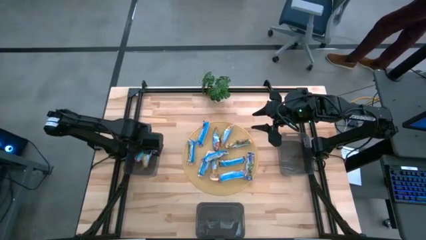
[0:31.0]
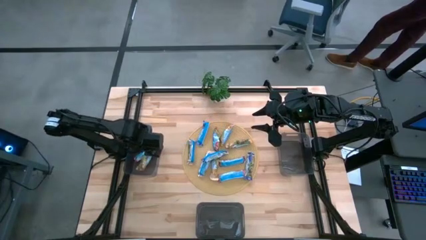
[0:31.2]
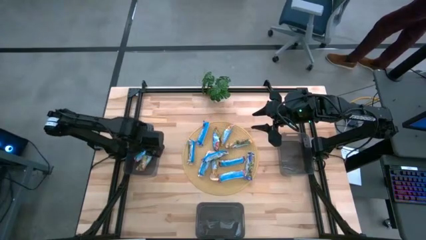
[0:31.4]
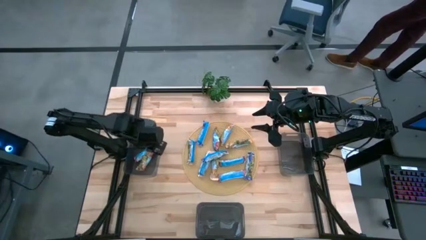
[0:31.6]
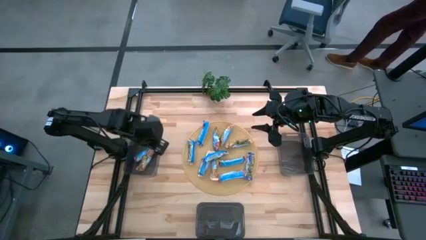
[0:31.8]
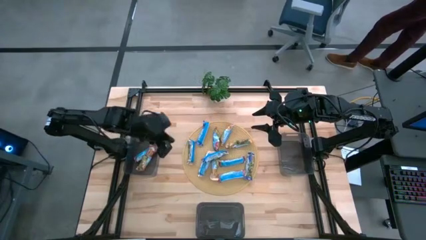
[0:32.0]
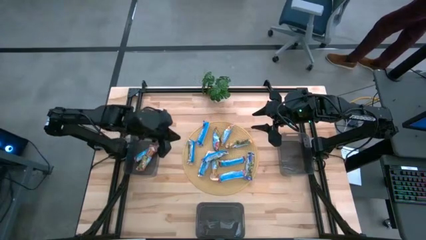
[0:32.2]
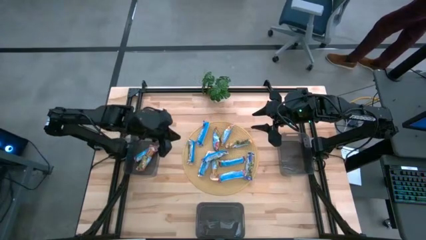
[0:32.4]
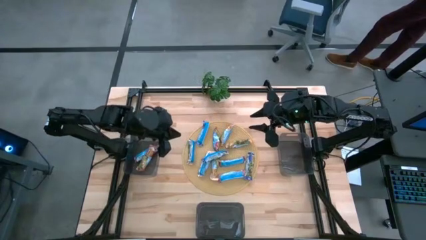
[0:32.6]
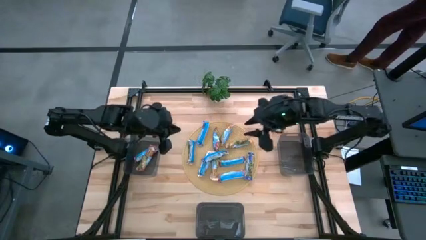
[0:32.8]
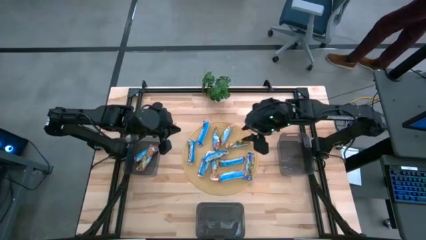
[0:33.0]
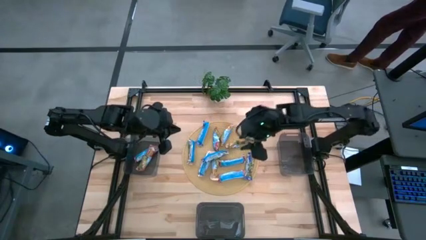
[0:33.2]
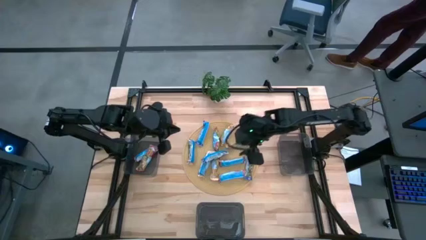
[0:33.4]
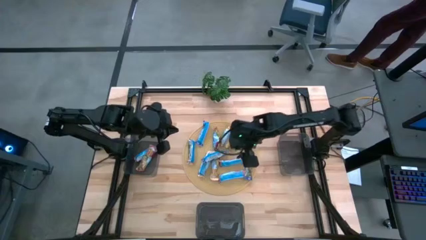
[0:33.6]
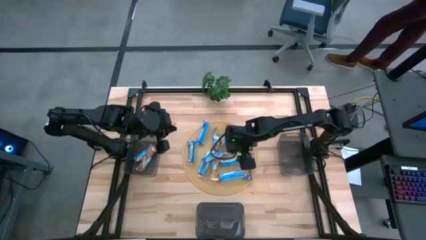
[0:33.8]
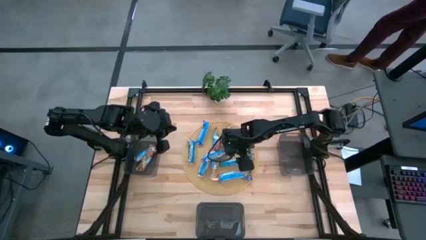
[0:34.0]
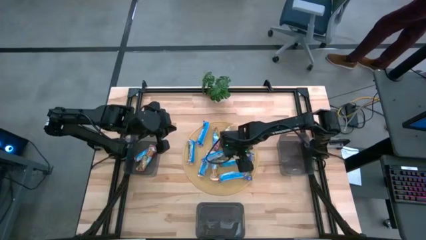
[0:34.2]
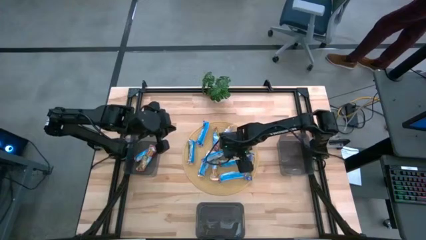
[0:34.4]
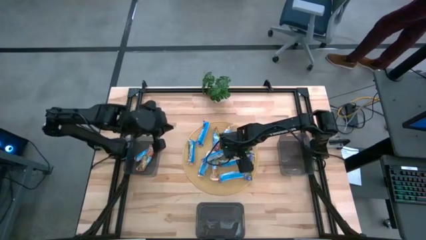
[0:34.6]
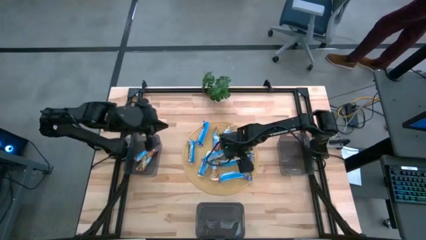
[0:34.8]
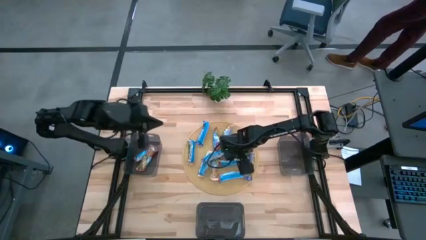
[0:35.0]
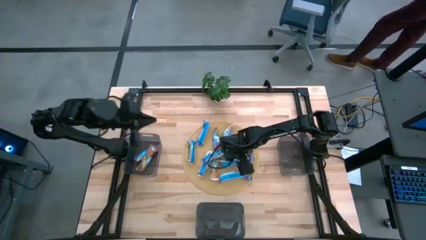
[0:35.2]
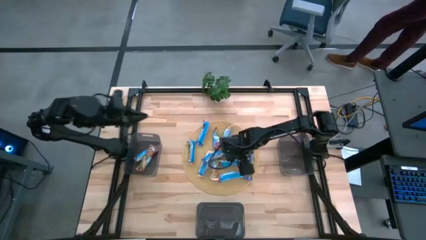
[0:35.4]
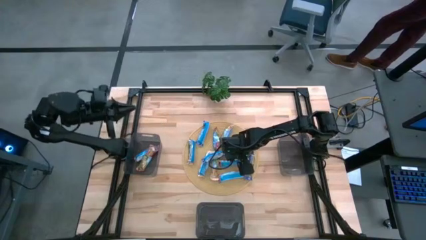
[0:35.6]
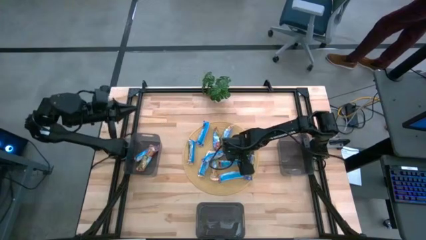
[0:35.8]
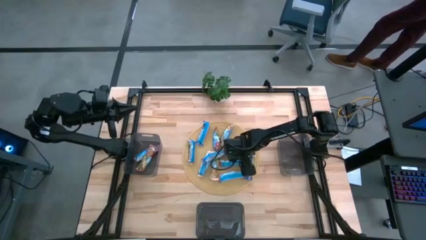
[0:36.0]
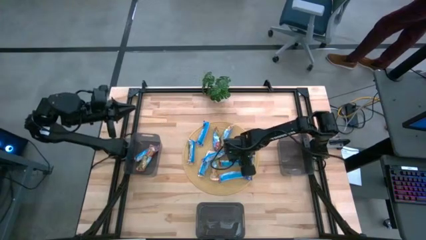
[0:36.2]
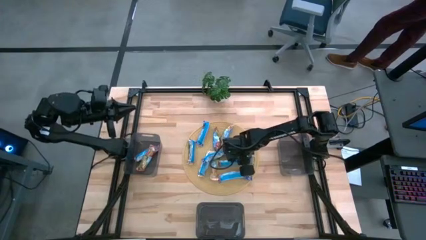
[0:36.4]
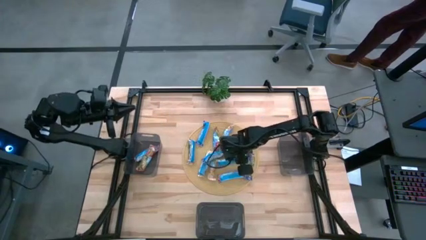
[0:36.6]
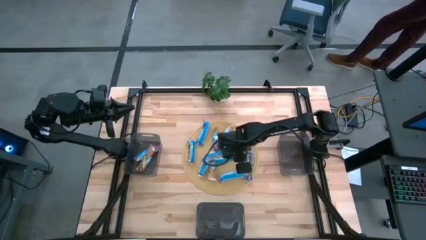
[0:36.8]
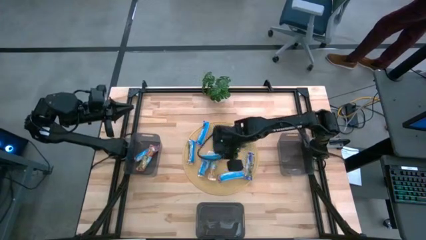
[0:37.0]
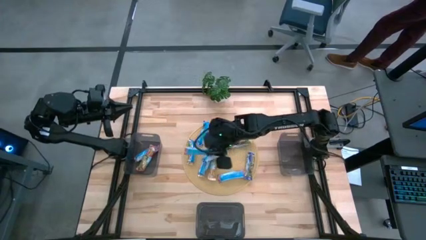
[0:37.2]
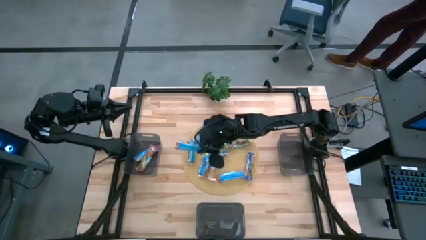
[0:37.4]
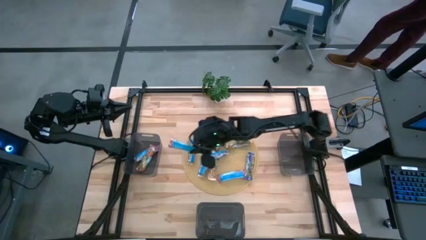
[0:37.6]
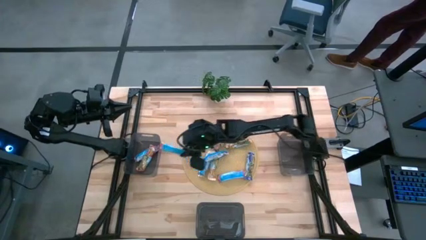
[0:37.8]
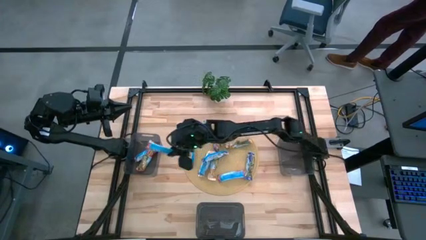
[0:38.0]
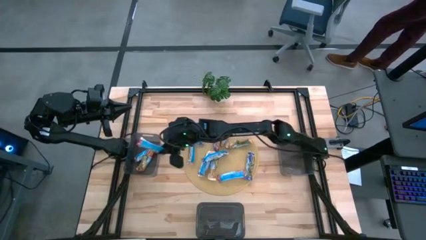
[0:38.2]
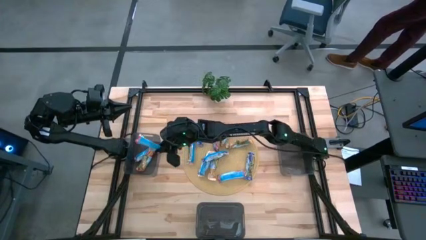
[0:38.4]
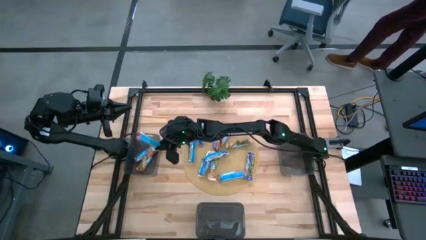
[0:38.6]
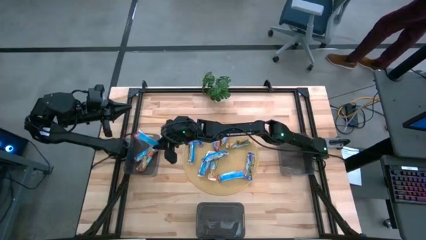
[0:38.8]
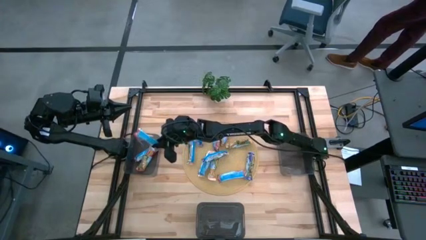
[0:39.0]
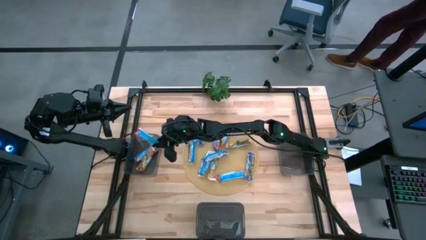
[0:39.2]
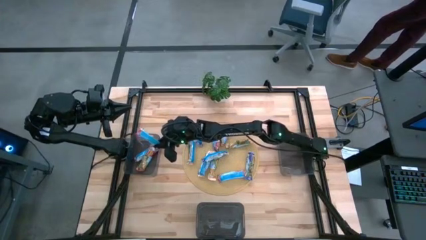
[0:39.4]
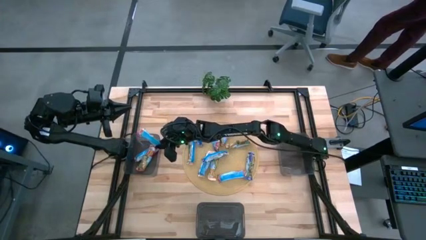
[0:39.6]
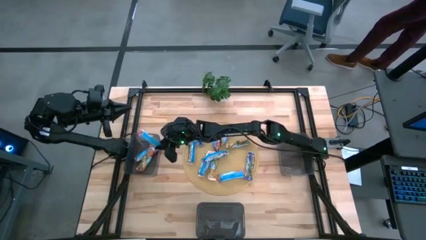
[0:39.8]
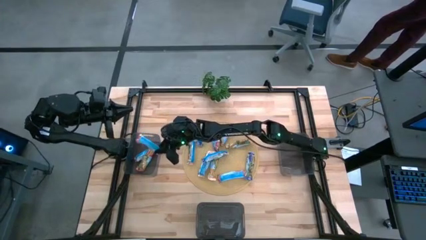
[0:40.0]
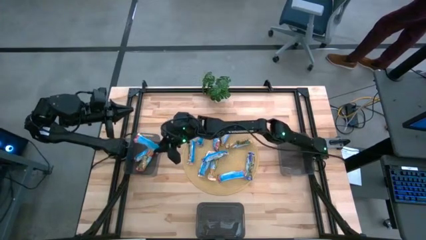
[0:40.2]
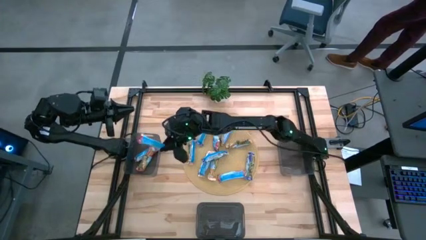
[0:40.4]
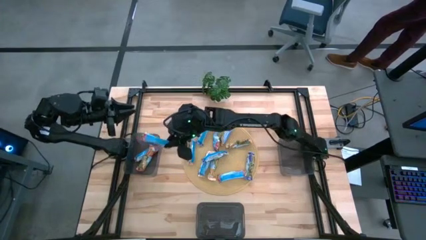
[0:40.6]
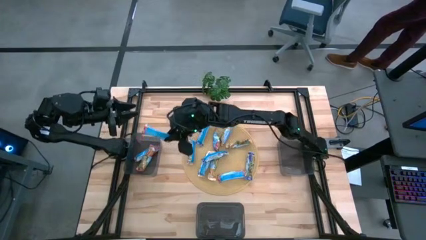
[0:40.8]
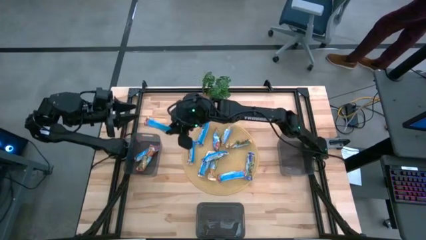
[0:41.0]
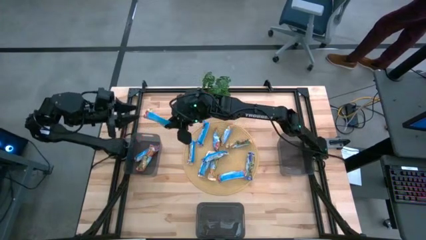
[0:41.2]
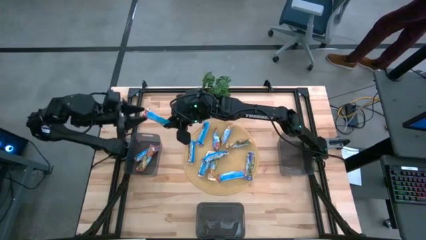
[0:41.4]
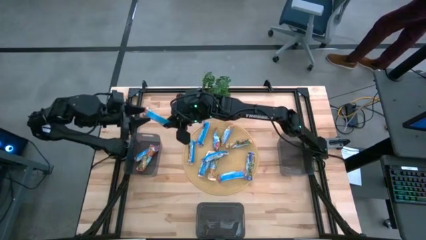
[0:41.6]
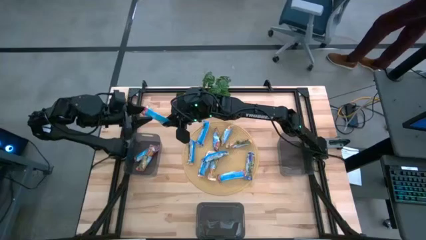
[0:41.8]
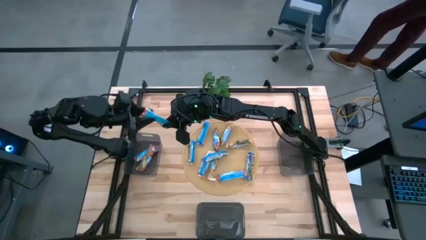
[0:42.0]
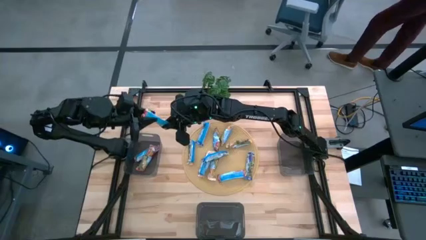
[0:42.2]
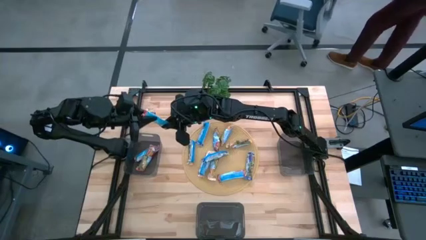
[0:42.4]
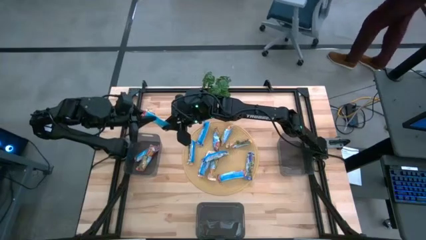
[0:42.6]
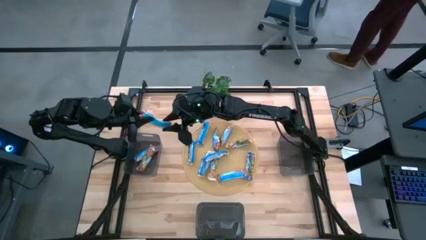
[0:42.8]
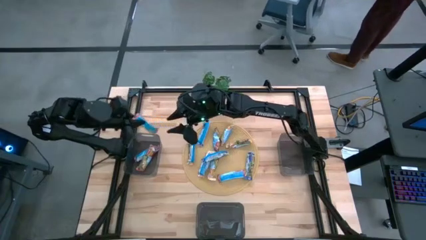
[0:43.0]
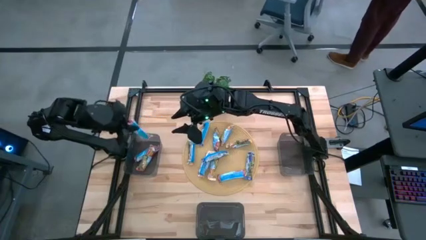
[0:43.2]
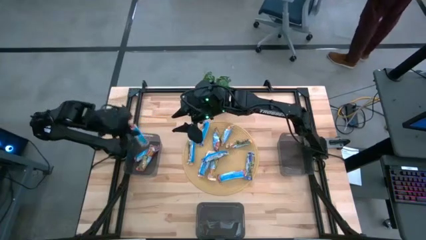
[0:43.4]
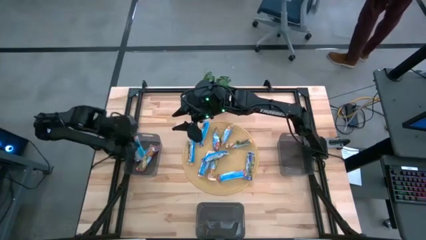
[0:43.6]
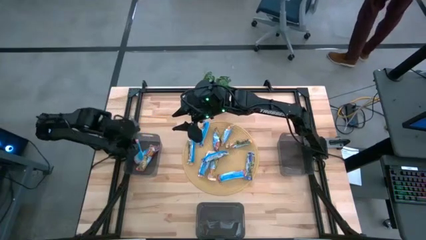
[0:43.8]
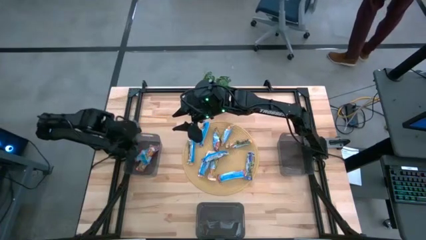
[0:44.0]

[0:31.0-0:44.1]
Task: Pick and place Granola Bars by type
Put the middle red granola bar into the top left bin
